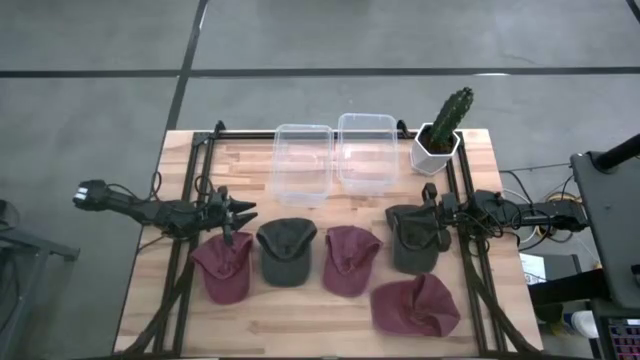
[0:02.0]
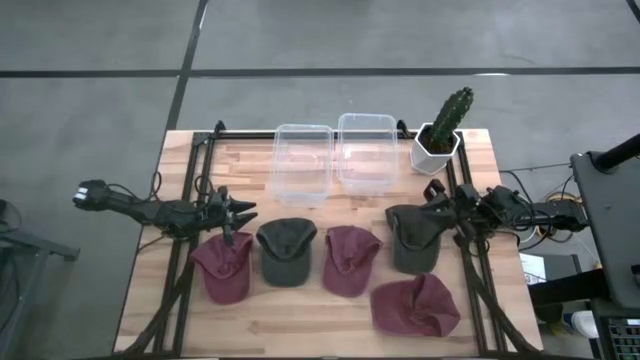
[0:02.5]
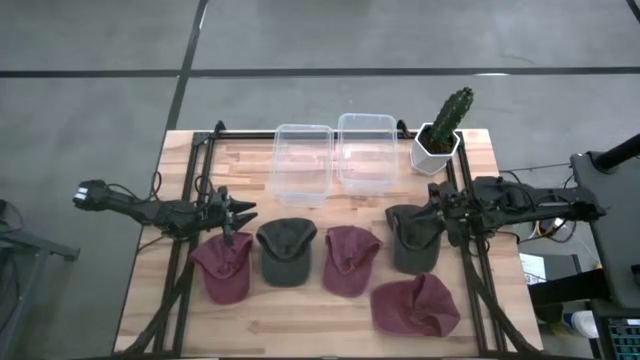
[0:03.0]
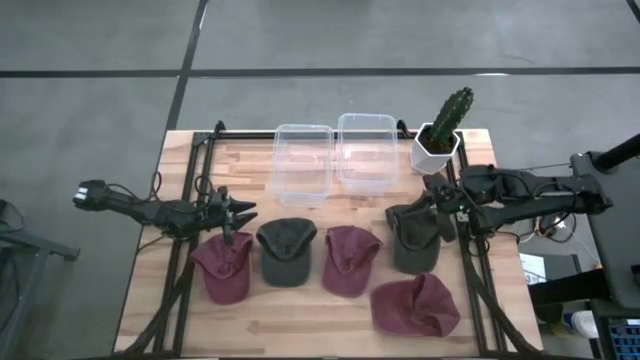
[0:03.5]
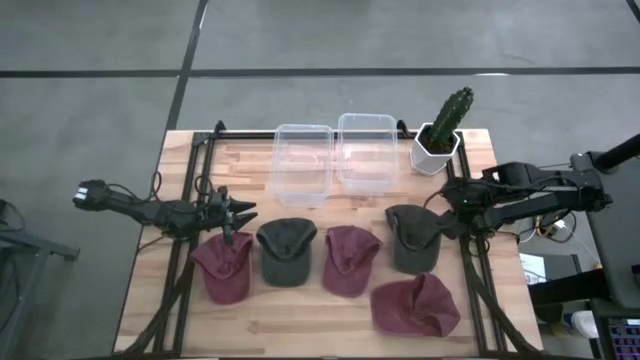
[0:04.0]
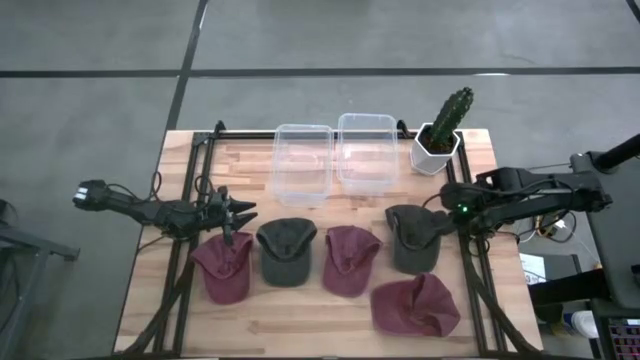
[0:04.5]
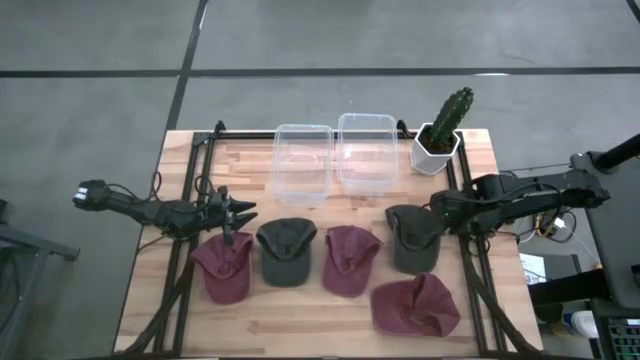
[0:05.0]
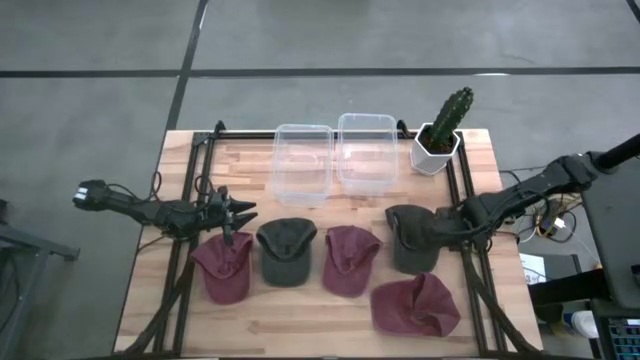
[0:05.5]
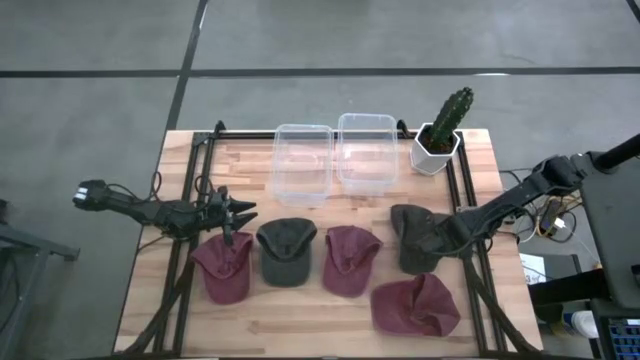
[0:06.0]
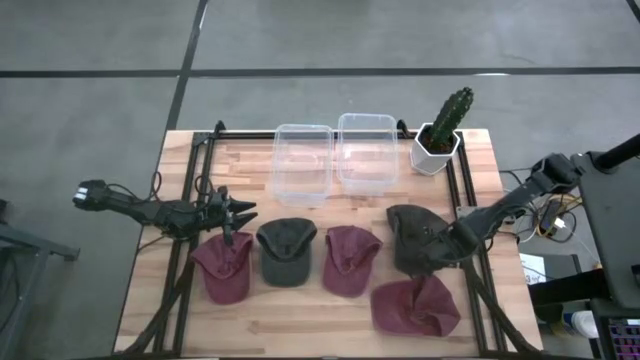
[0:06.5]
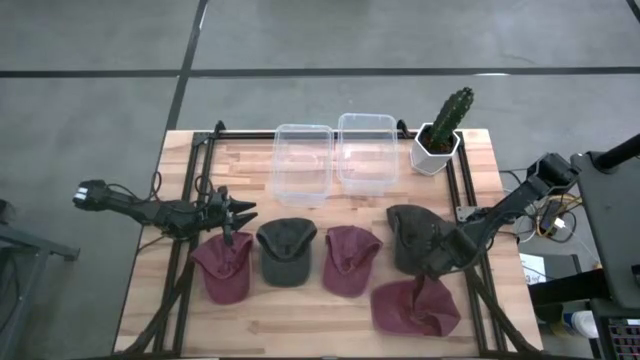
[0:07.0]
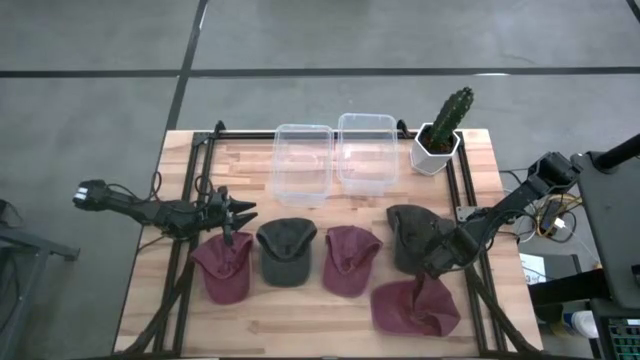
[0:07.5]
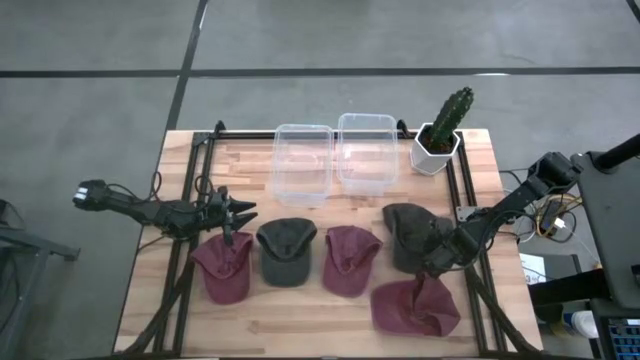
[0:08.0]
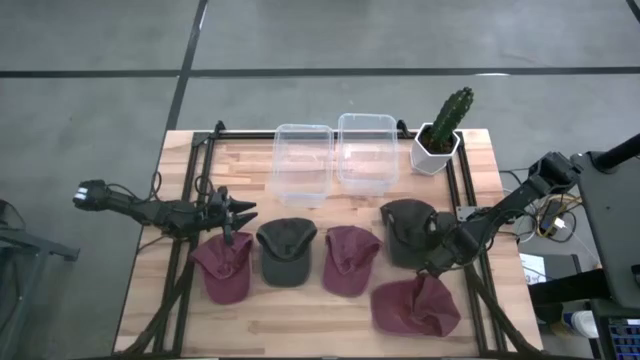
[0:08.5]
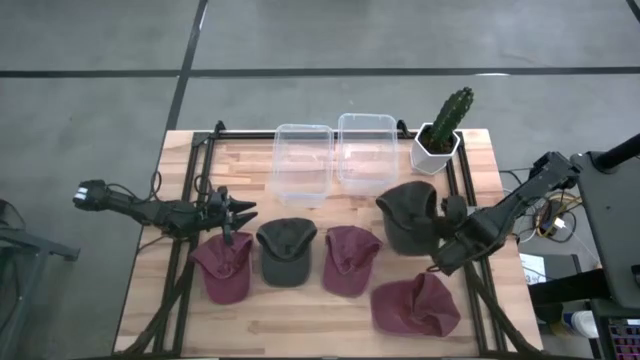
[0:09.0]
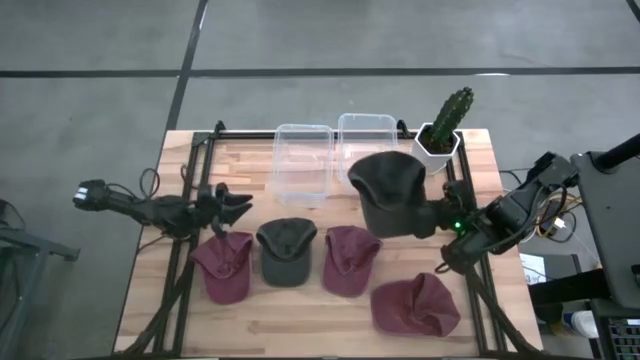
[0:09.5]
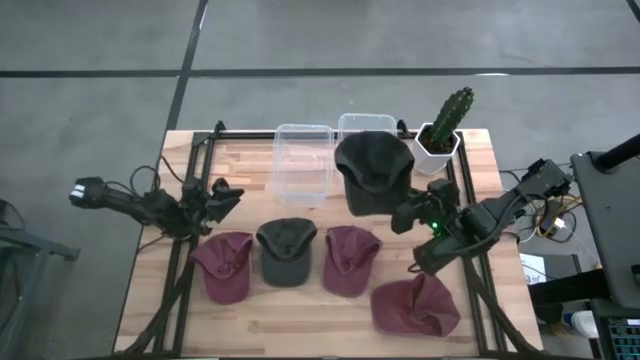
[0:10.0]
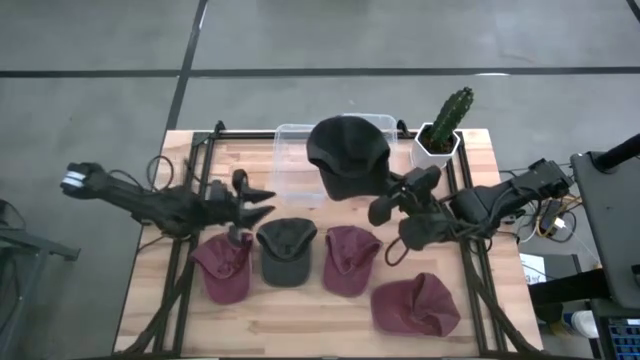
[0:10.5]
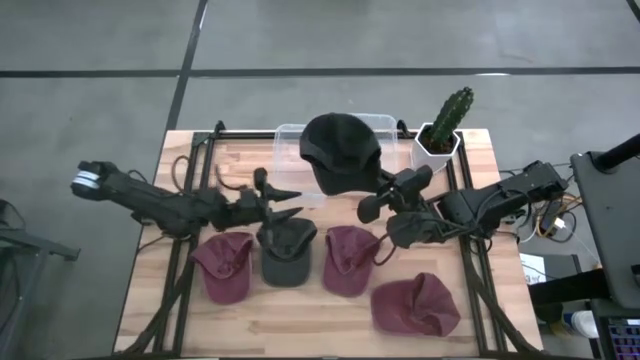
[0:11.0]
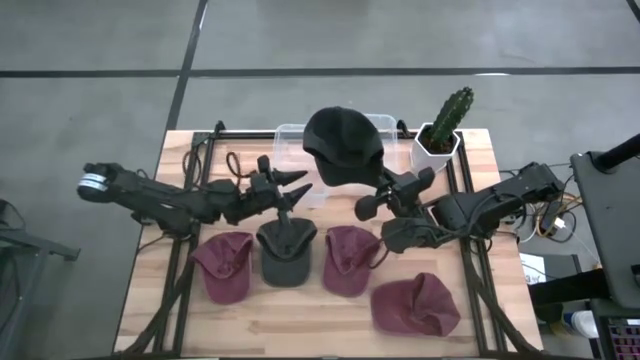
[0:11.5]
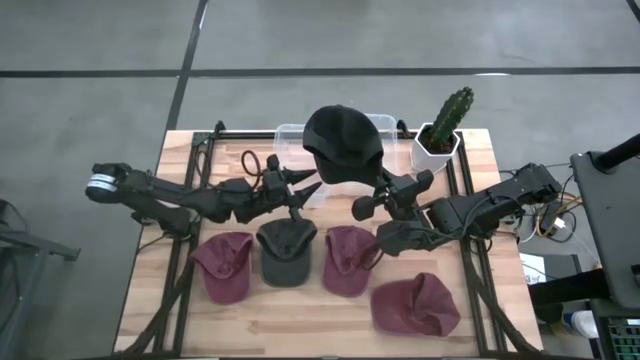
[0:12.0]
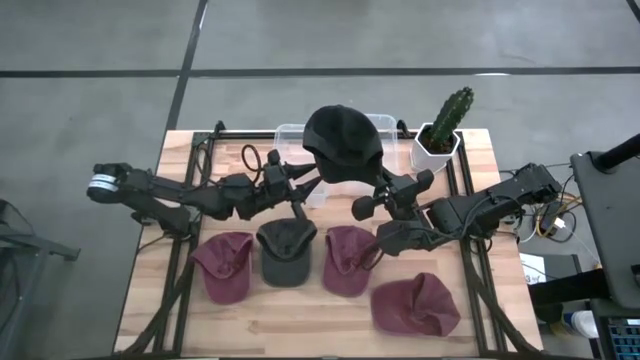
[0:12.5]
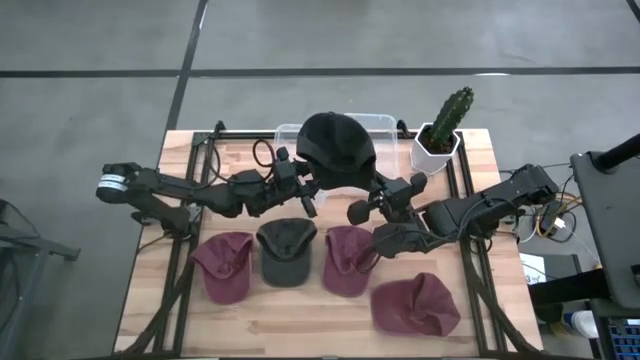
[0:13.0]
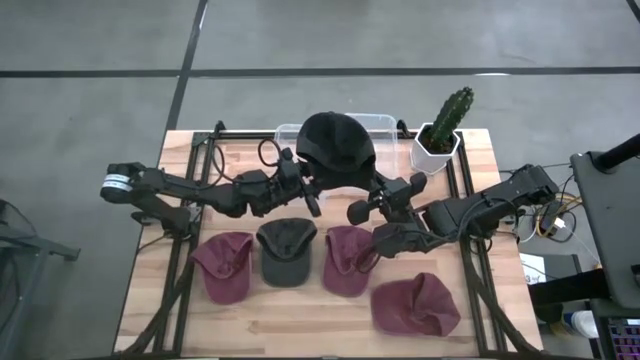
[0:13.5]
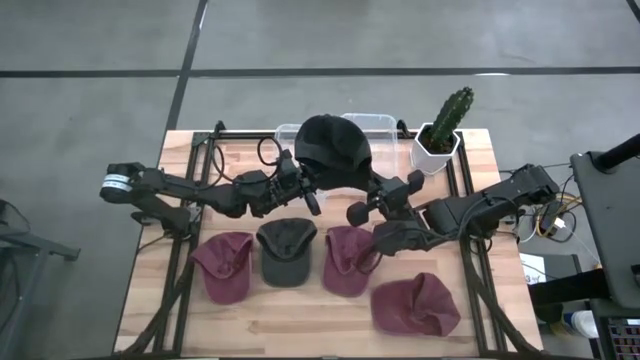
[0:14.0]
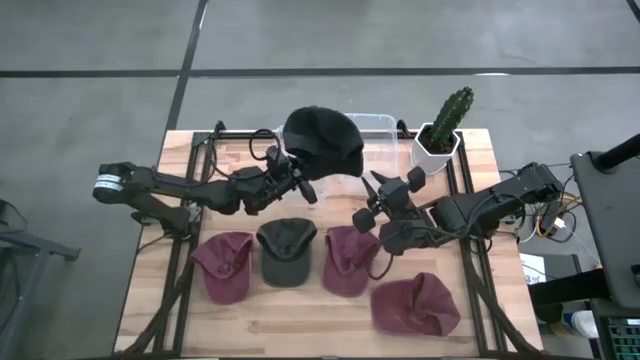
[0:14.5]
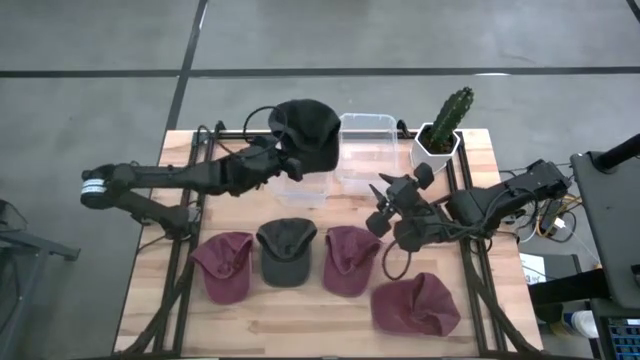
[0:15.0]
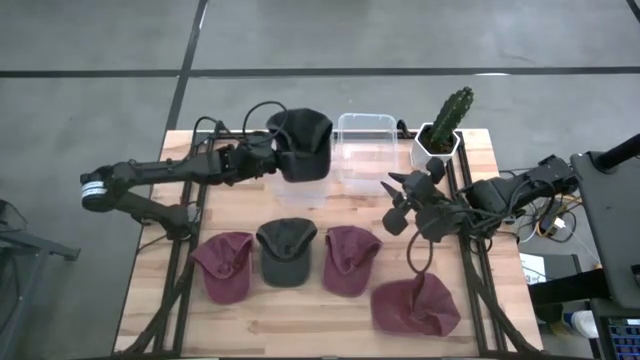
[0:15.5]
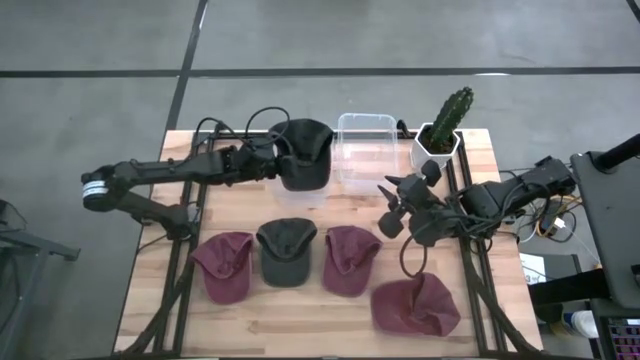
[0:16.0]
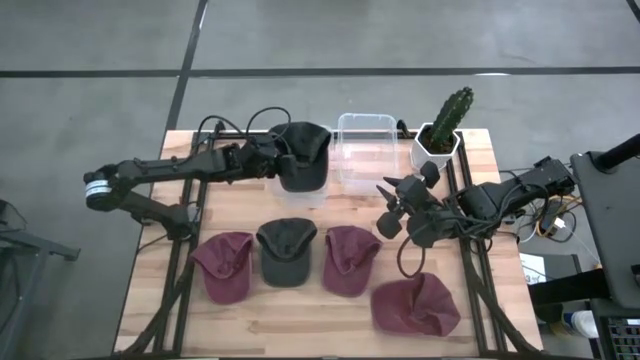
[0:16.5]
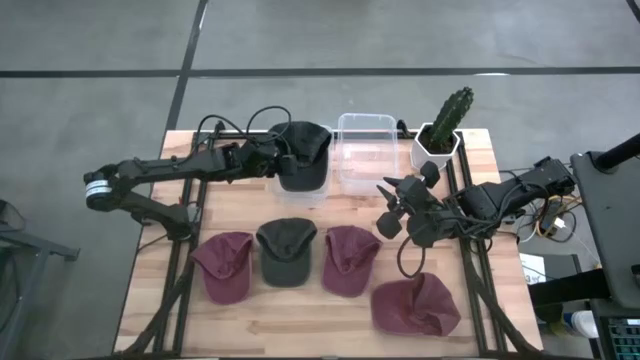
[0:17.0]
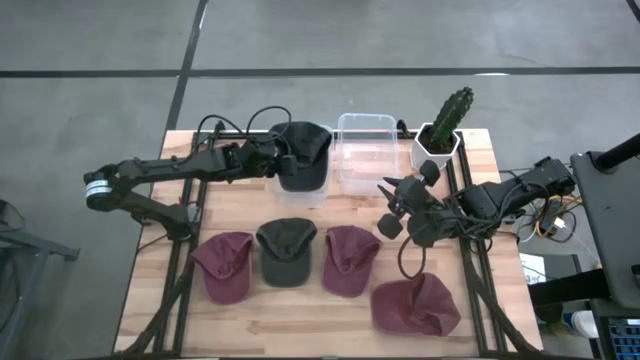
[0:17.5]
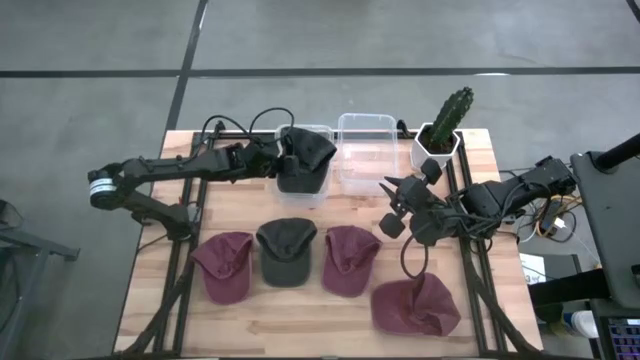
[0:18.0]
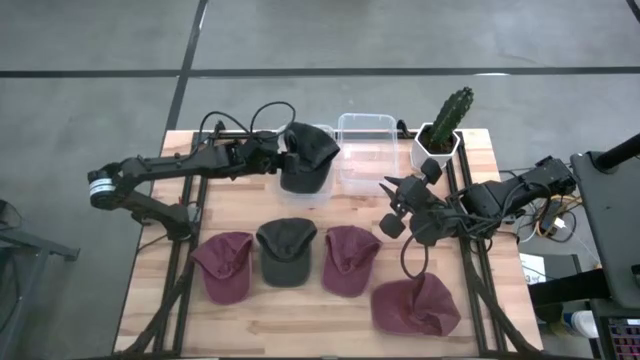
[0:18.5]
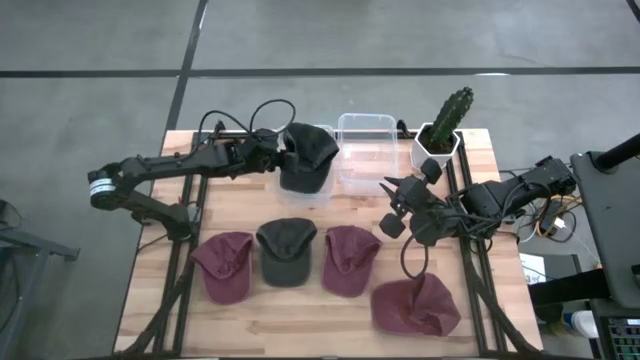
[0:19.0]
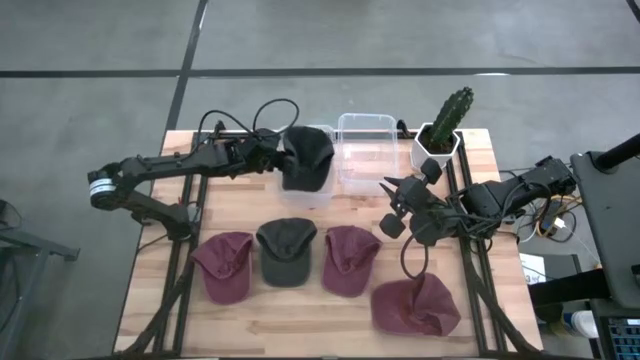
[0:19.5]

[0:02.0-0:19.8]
Task: Pick & Place hat
Put the right black cap into the left transparent bin
